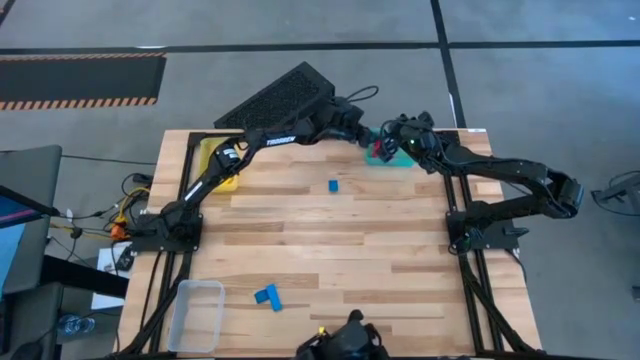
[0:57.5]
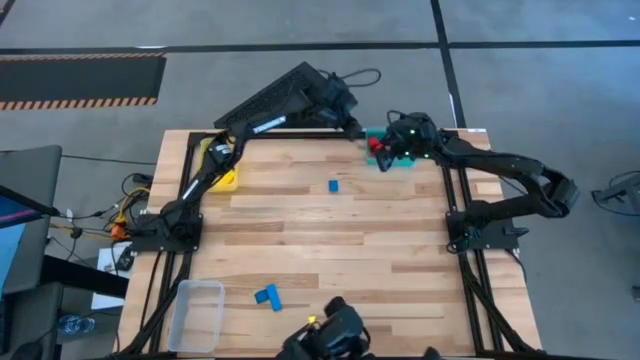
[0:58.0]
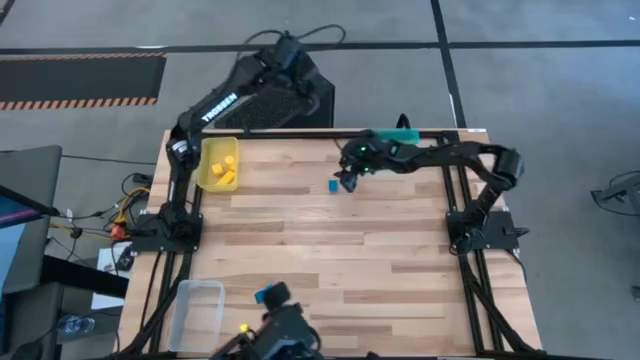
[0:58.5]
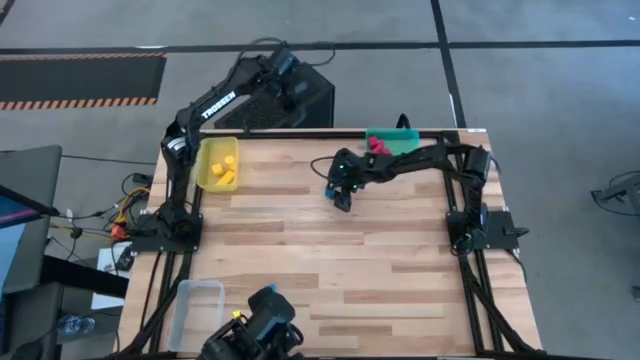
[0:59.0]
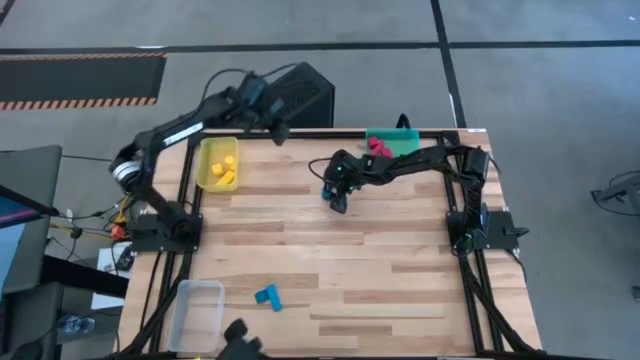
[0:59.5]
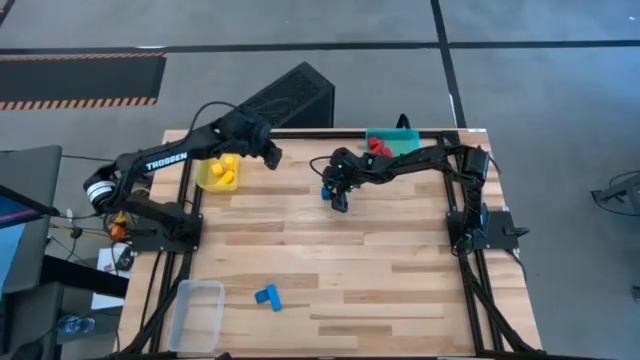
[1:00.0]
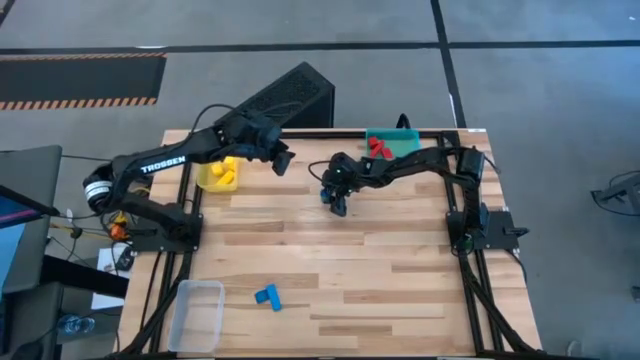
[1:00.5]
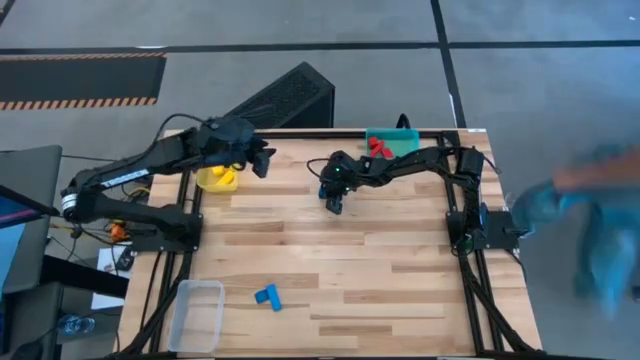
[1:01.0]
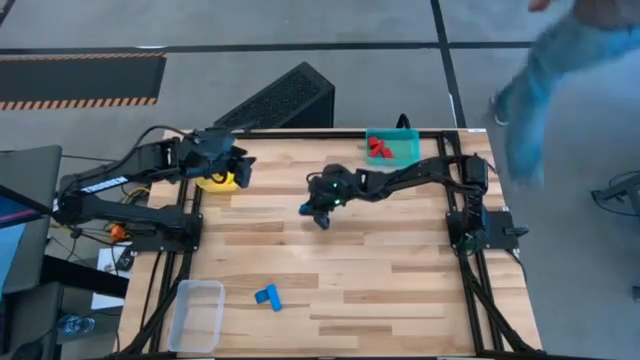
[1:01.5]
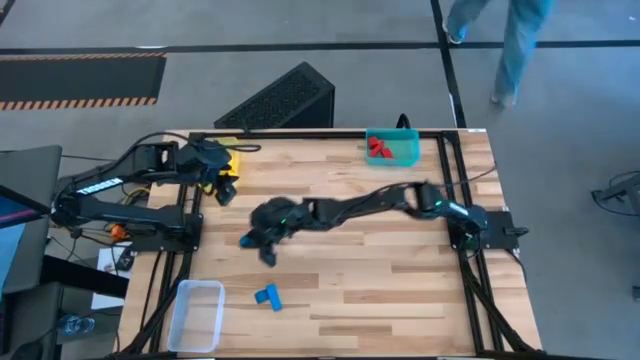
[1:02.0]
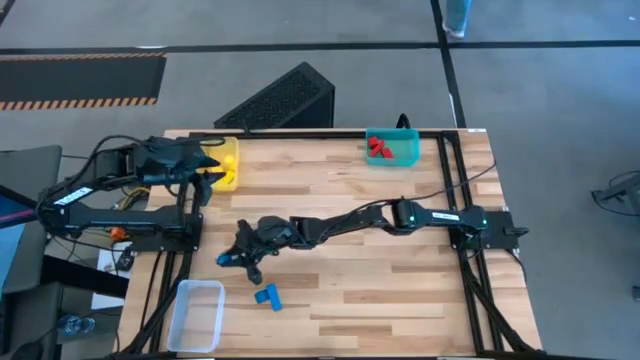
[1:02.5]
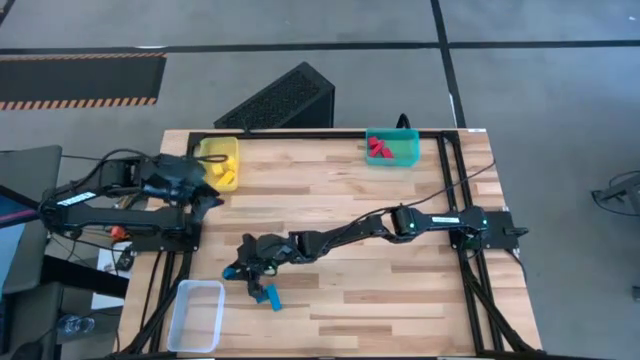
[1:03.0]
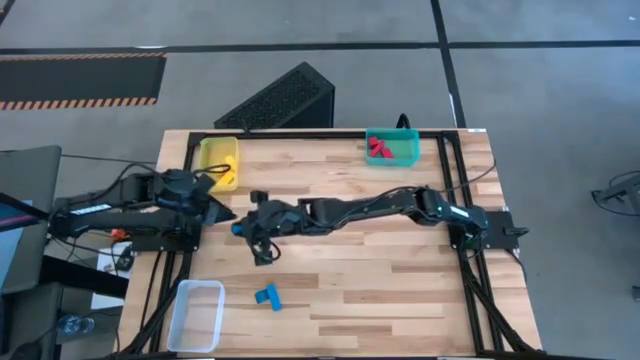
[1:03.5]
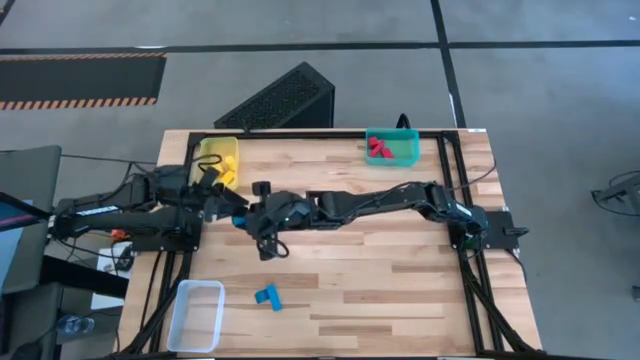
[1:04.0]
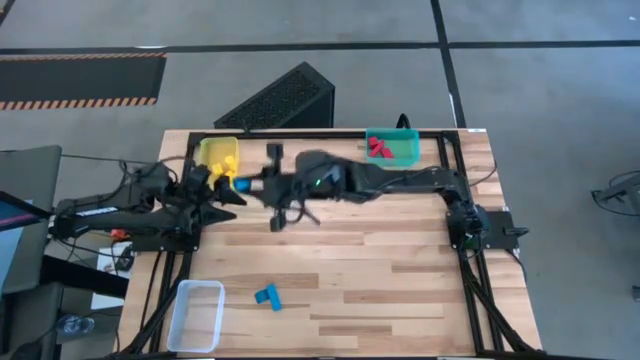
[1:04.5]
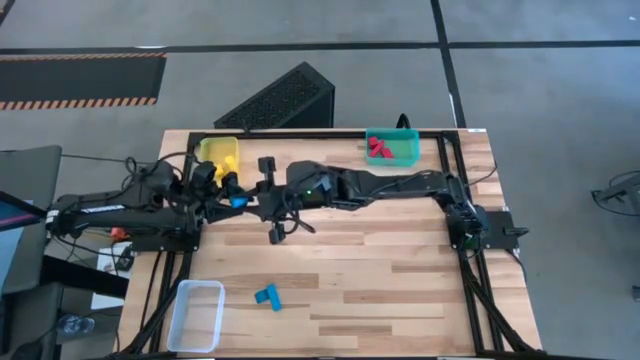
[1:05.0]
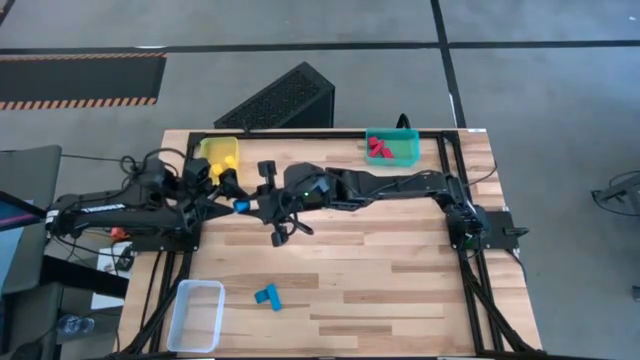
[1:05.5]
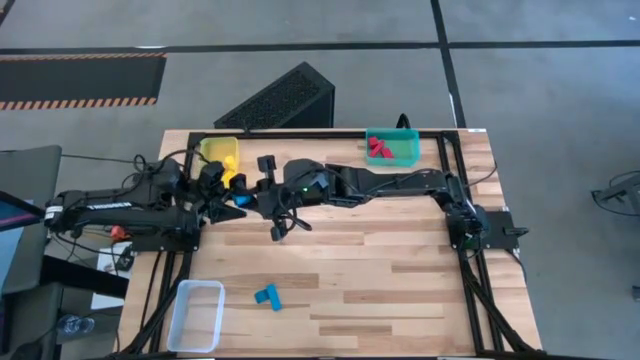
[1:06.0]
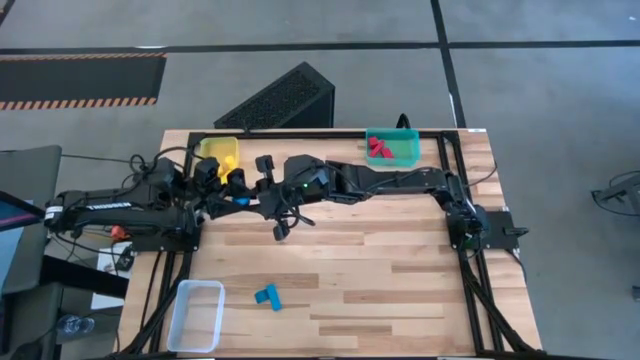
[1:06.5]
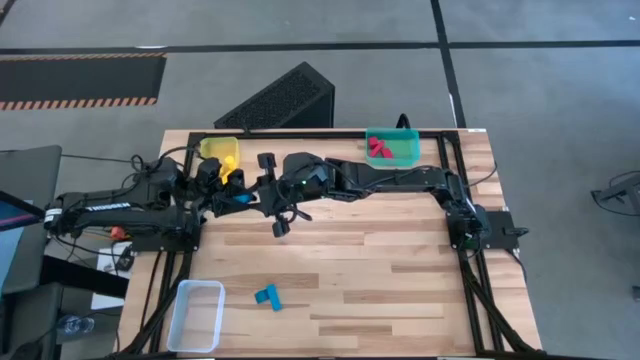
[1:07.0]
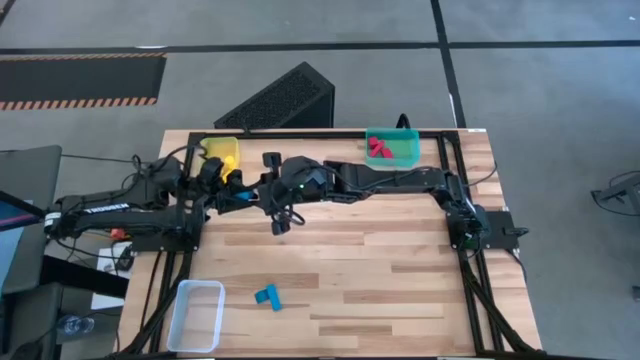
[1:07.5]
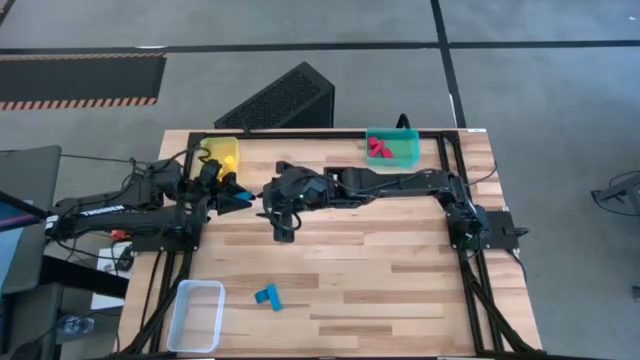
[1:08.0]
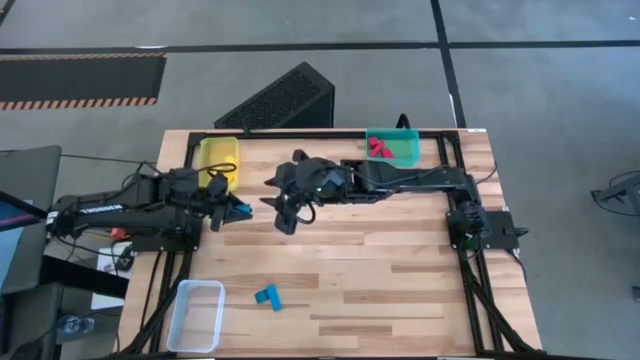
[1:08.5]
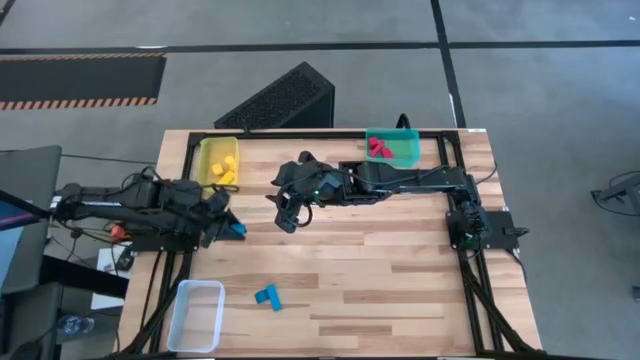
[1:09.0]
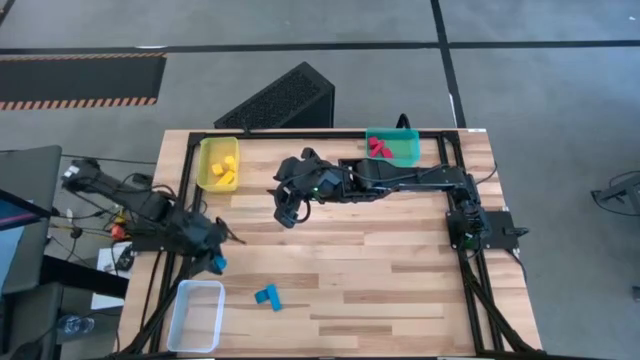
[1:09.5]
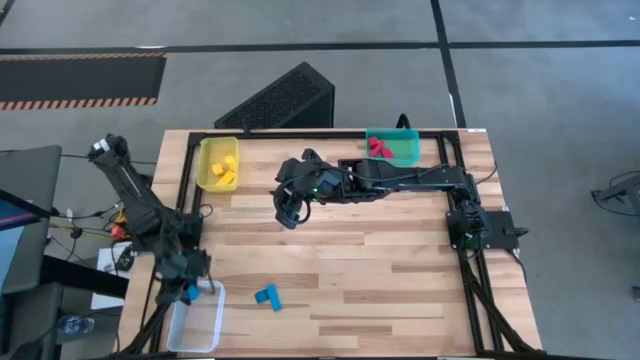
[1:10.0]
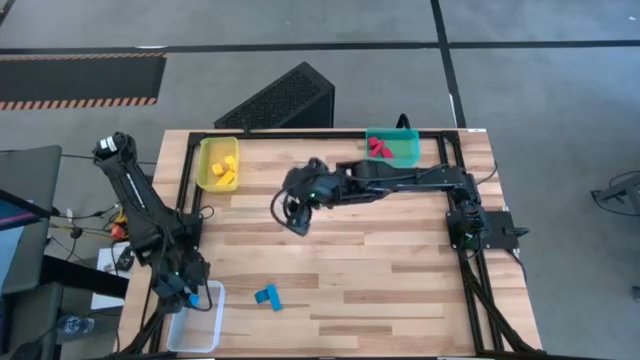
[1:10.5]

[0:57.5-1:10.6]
Task: Sort & place blocks by color
Put the top right blue block into the transparent bin

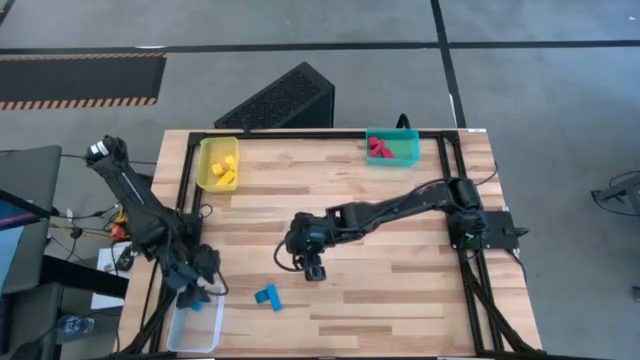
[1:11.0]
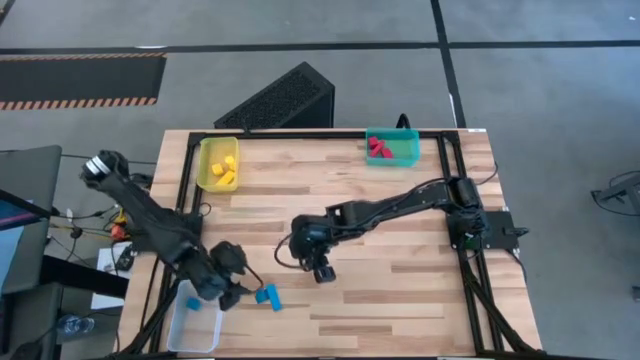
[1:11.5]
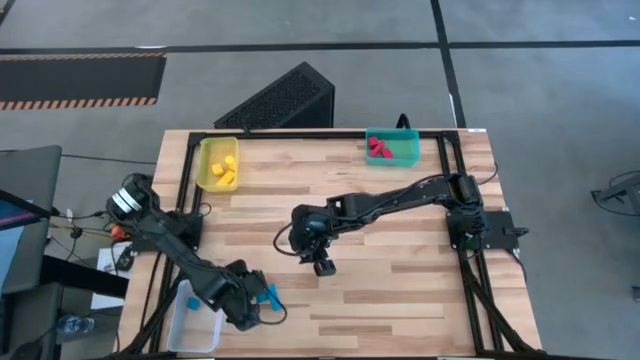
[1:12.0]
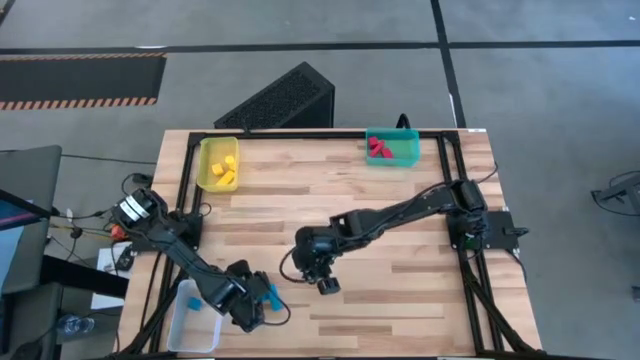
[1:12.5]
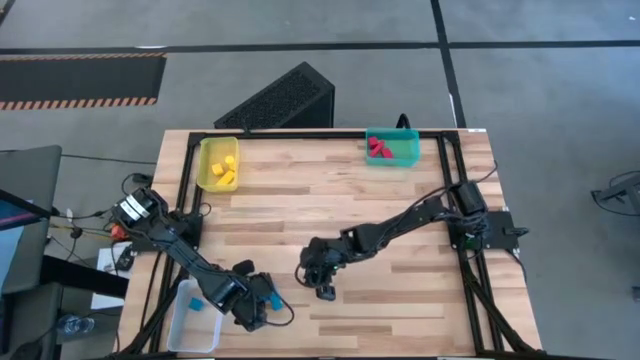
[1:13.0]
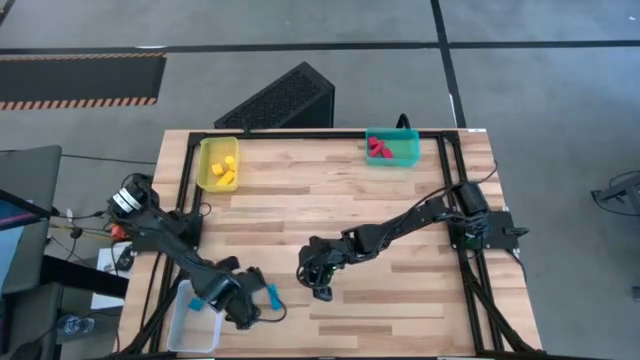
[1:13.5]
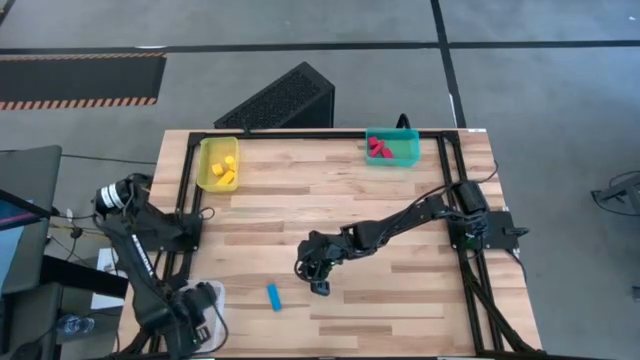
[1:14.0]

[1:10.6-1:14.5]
Put the left blue block into the transparent bin

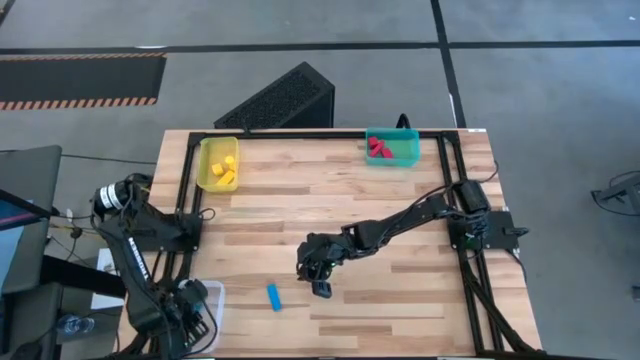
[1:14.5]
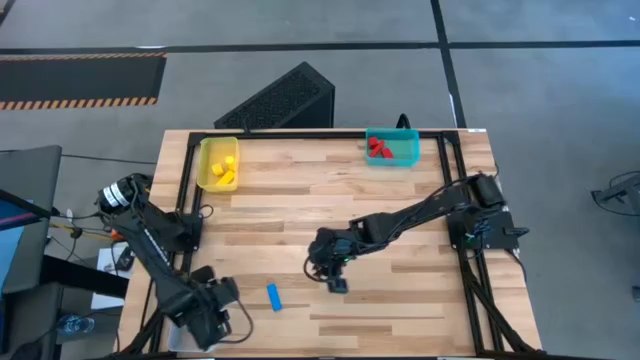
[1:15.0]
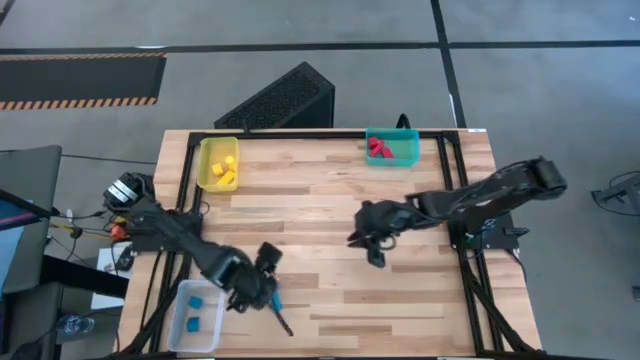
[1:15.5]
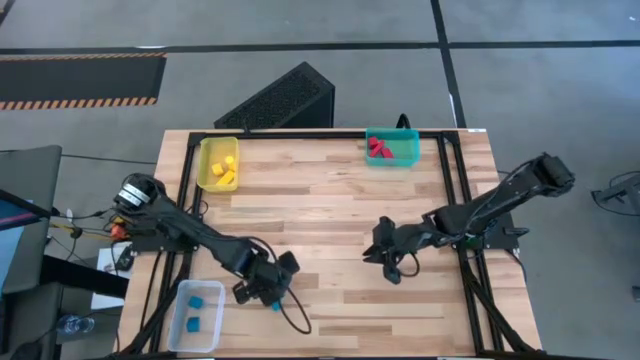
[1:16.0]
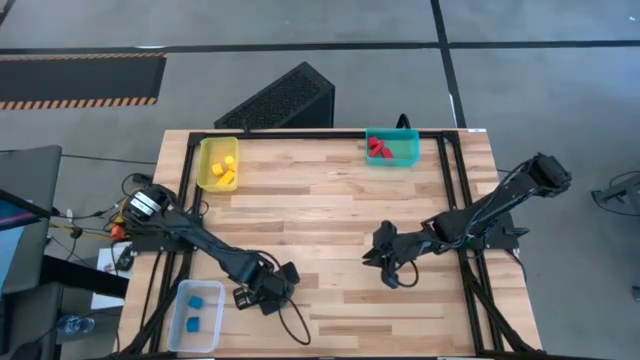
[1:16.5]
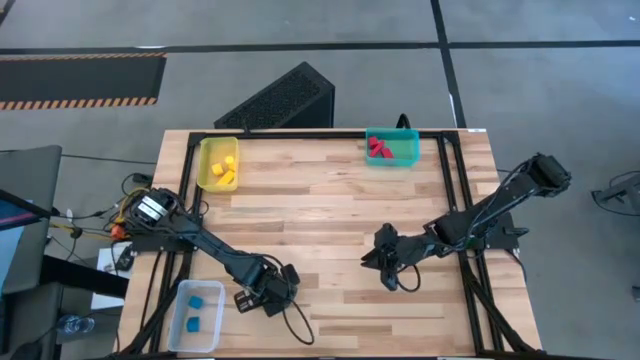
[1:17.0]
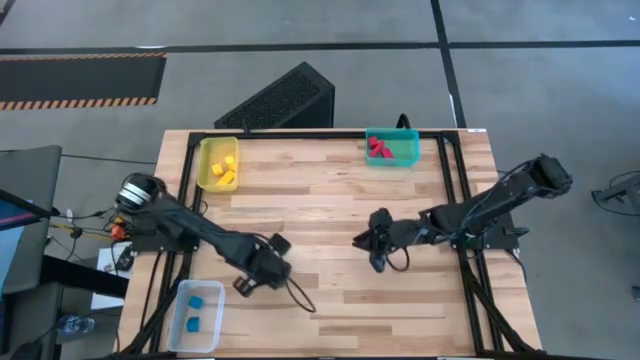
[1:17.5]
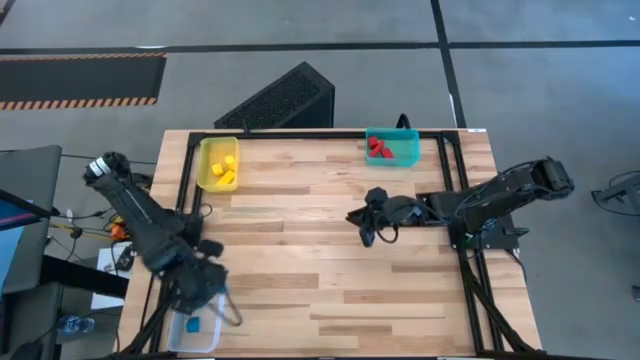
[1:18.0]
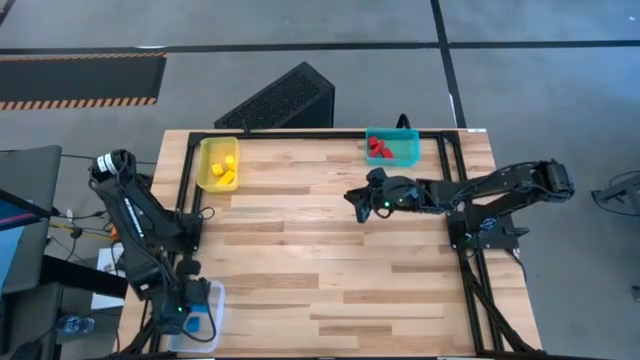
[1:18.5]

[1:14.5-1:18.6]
Put the blue block into the transparent bin
